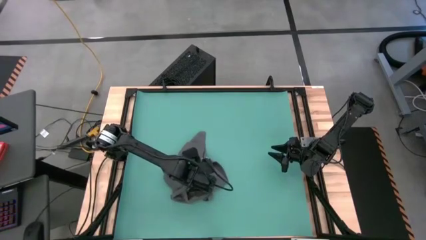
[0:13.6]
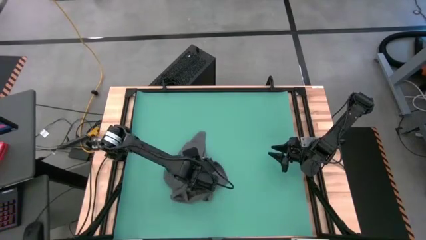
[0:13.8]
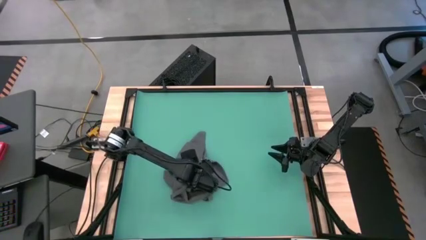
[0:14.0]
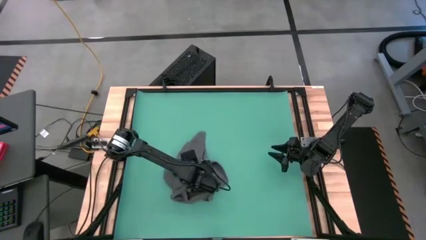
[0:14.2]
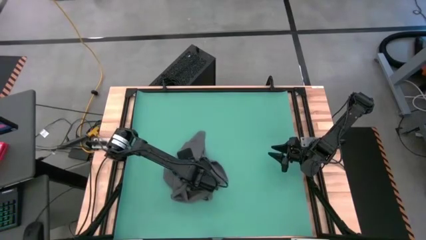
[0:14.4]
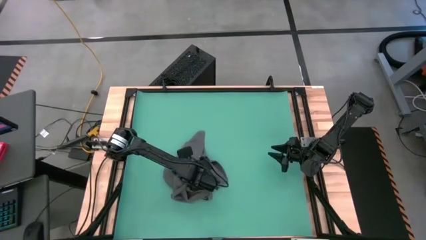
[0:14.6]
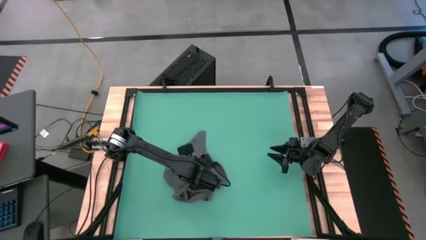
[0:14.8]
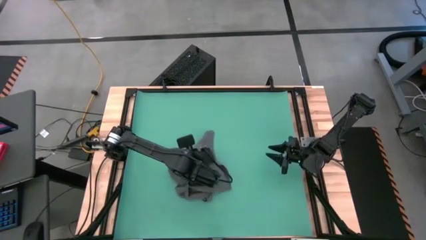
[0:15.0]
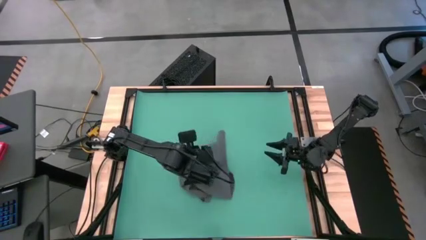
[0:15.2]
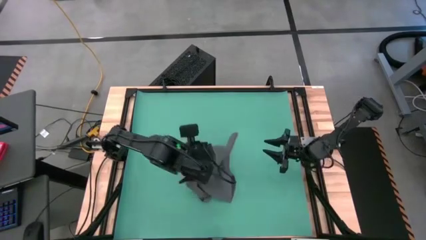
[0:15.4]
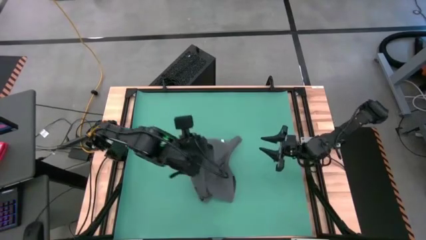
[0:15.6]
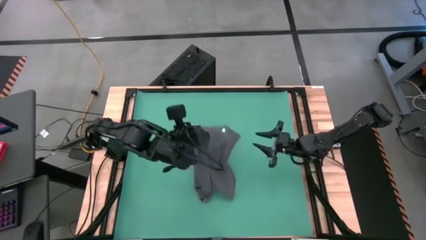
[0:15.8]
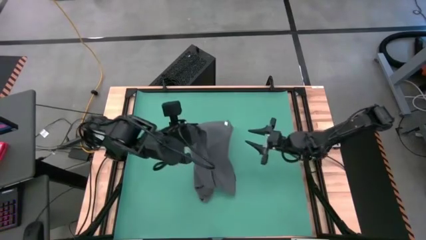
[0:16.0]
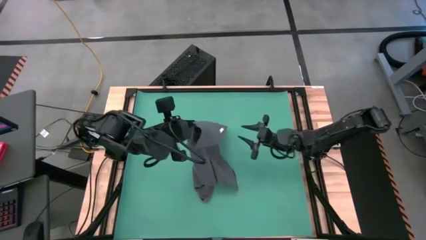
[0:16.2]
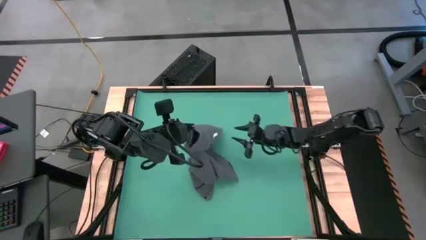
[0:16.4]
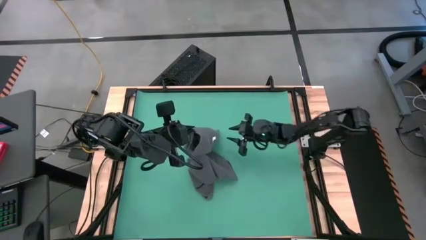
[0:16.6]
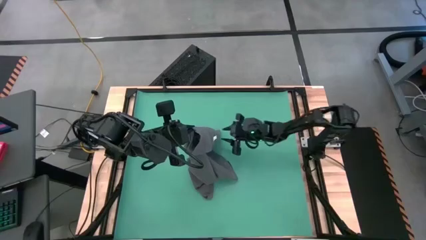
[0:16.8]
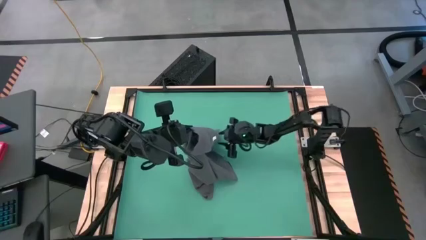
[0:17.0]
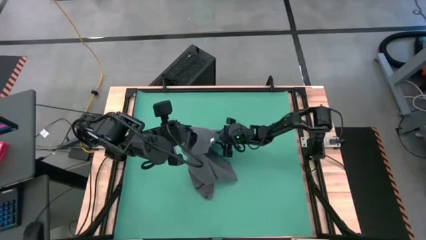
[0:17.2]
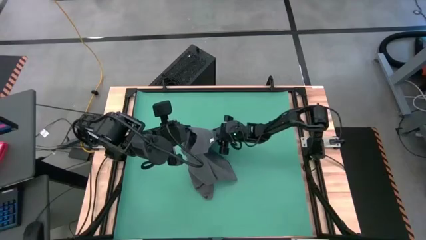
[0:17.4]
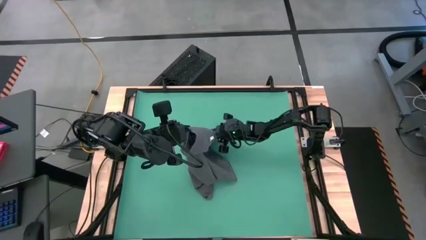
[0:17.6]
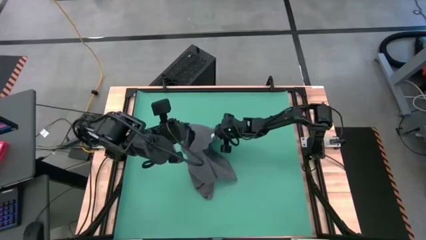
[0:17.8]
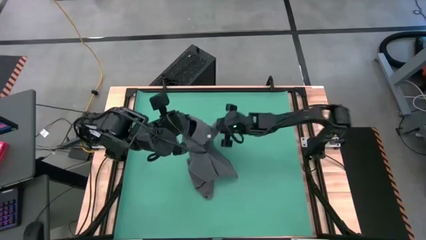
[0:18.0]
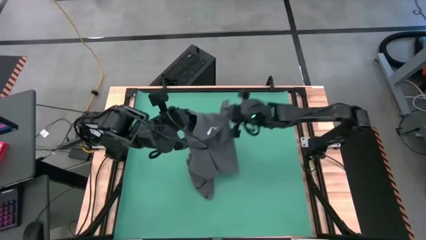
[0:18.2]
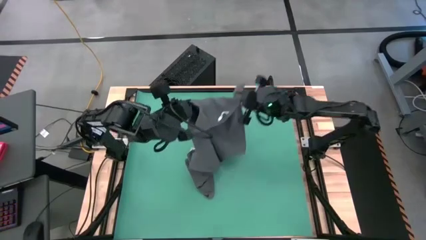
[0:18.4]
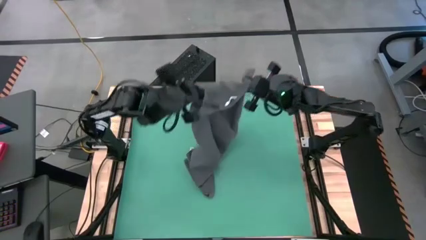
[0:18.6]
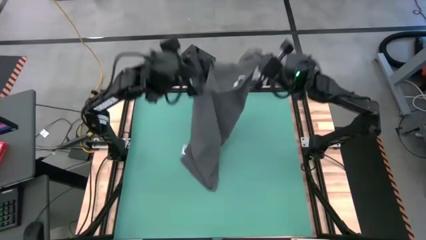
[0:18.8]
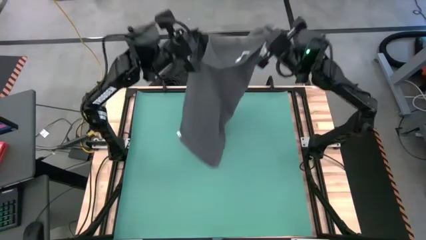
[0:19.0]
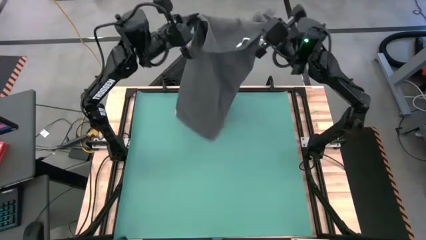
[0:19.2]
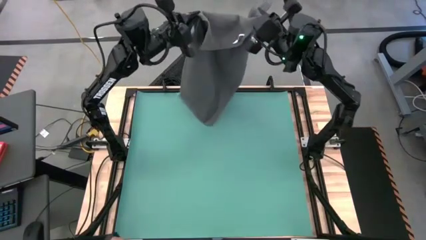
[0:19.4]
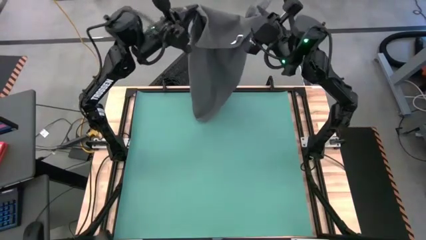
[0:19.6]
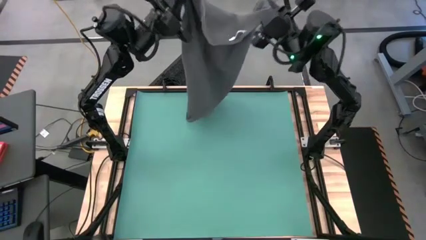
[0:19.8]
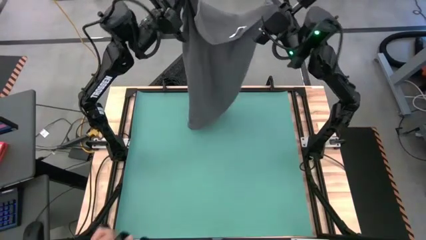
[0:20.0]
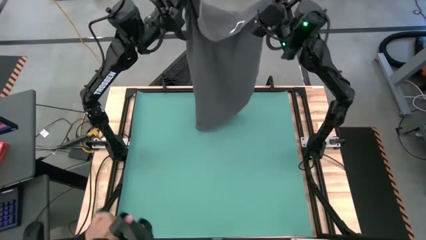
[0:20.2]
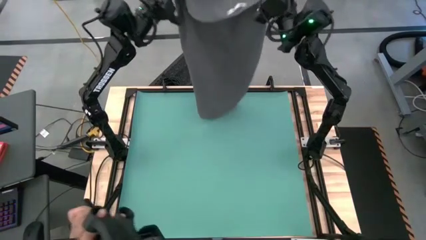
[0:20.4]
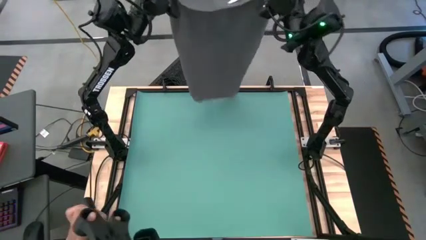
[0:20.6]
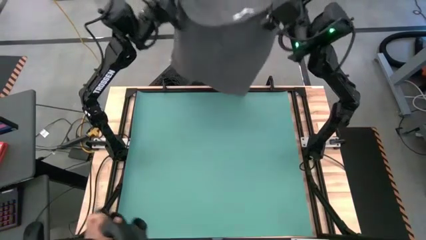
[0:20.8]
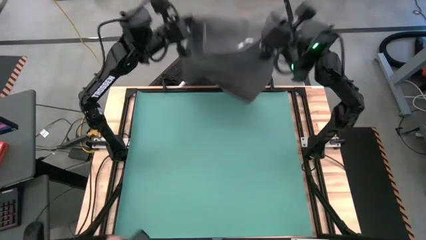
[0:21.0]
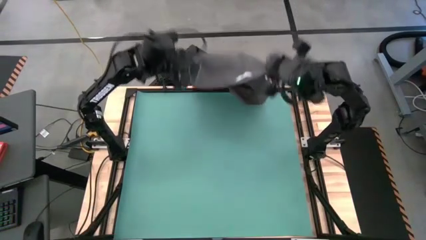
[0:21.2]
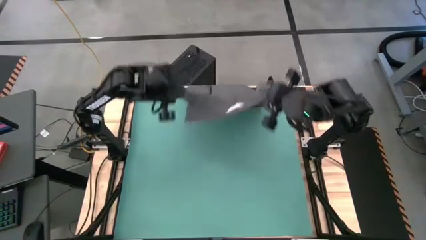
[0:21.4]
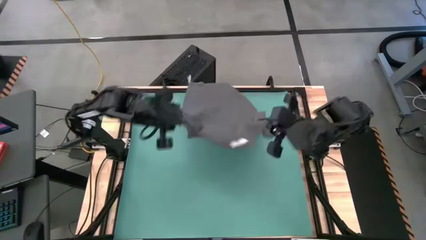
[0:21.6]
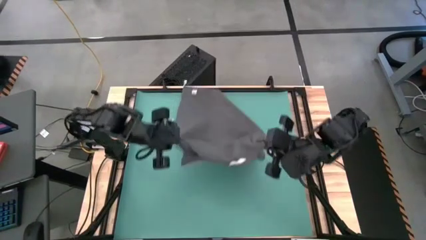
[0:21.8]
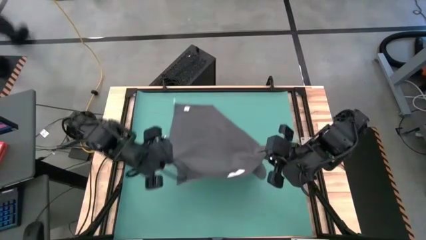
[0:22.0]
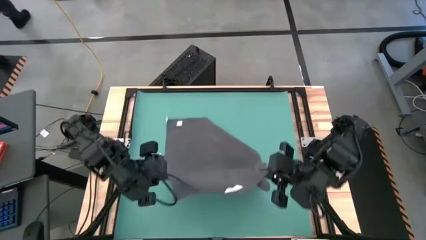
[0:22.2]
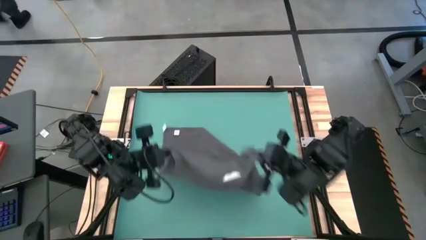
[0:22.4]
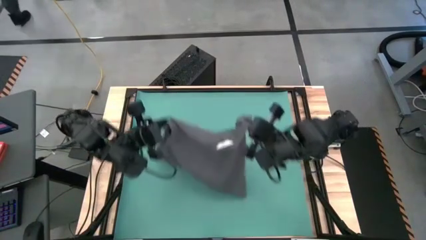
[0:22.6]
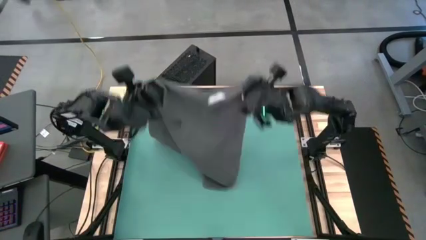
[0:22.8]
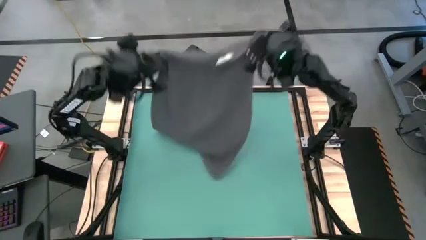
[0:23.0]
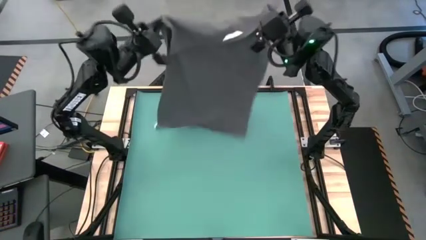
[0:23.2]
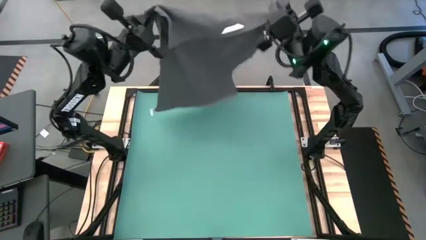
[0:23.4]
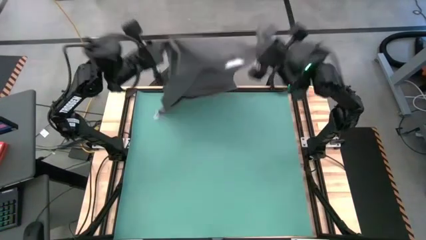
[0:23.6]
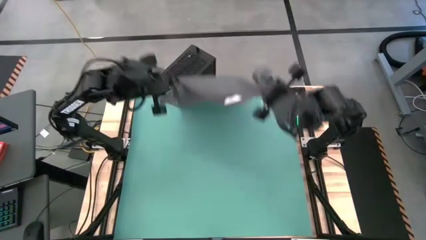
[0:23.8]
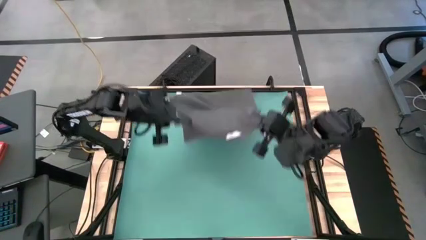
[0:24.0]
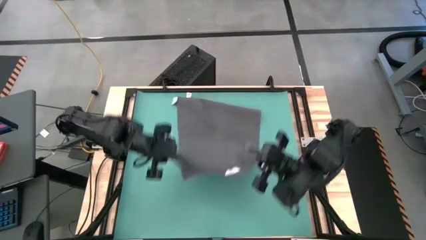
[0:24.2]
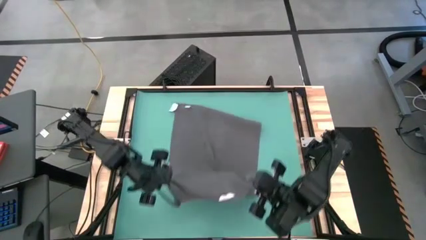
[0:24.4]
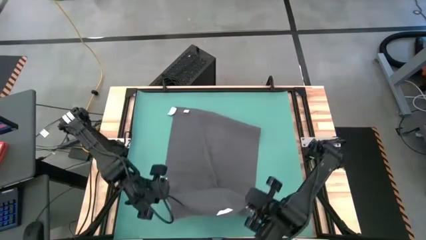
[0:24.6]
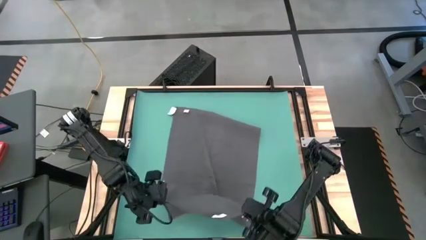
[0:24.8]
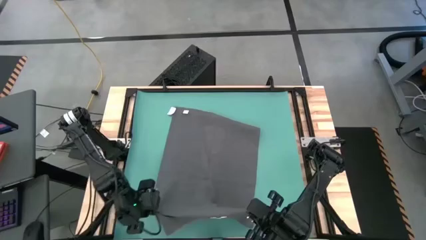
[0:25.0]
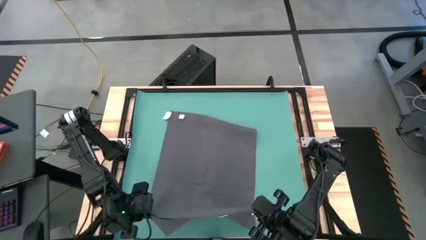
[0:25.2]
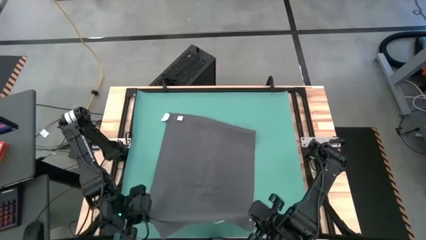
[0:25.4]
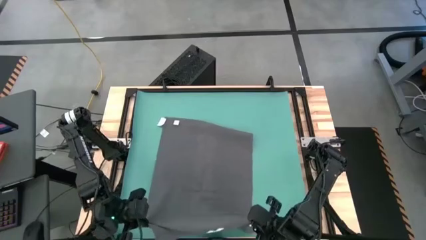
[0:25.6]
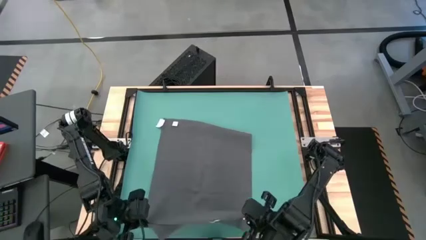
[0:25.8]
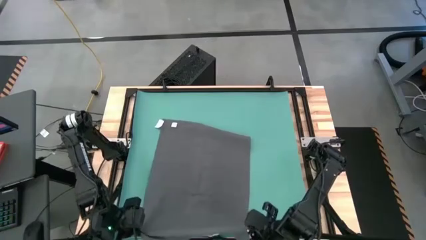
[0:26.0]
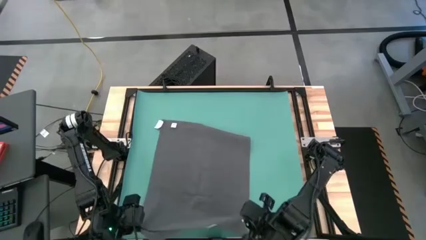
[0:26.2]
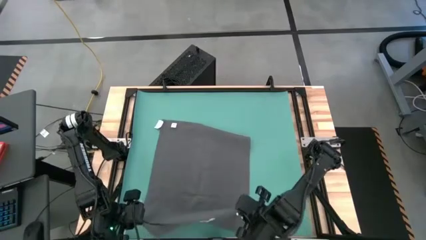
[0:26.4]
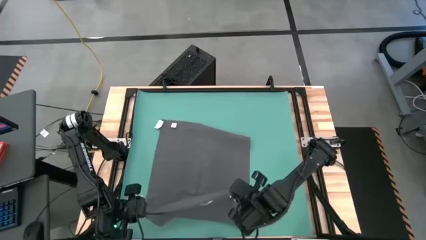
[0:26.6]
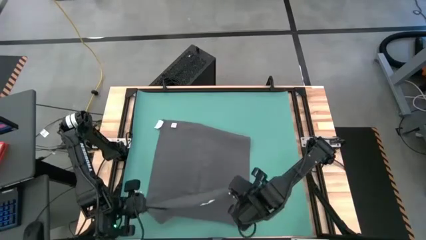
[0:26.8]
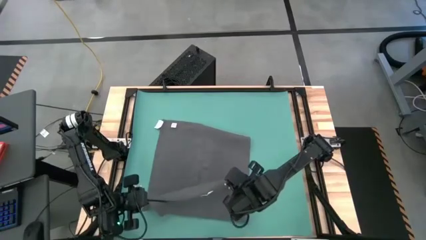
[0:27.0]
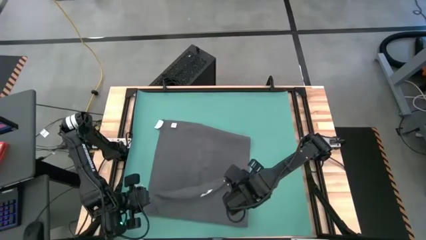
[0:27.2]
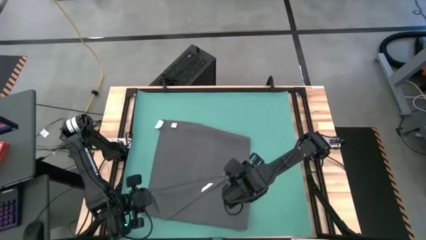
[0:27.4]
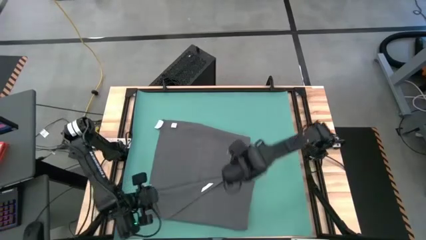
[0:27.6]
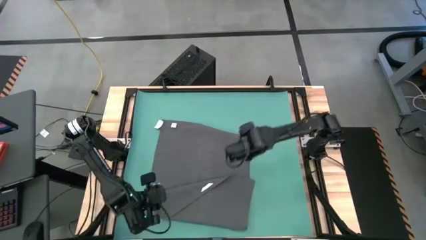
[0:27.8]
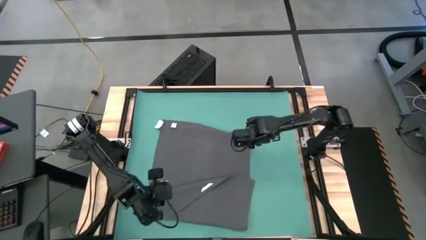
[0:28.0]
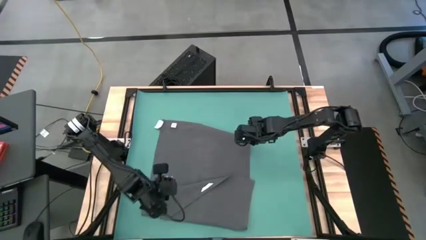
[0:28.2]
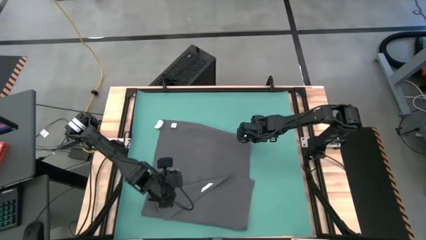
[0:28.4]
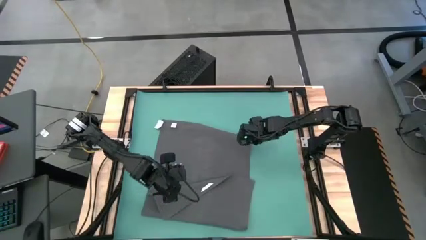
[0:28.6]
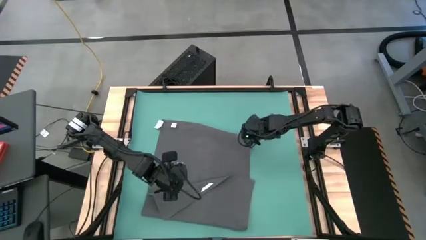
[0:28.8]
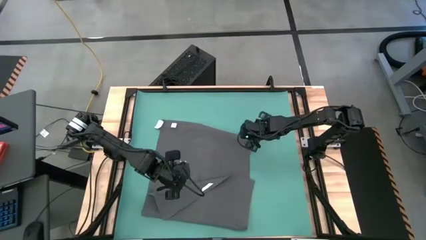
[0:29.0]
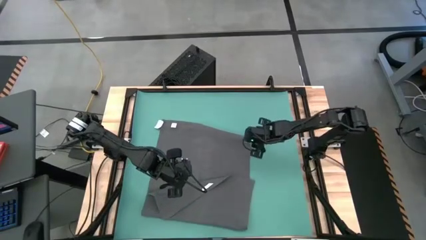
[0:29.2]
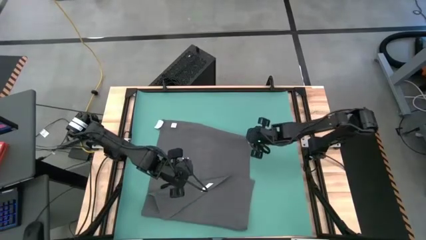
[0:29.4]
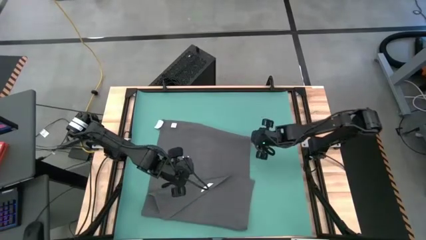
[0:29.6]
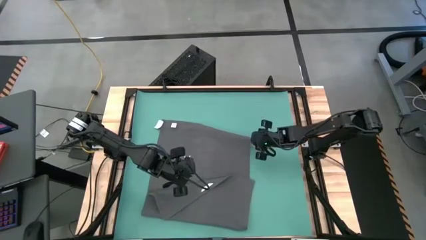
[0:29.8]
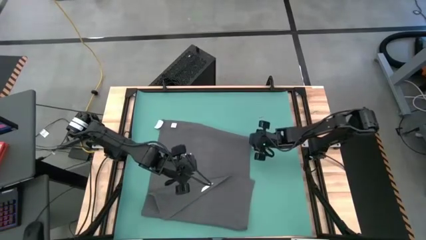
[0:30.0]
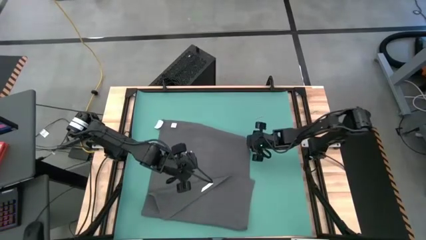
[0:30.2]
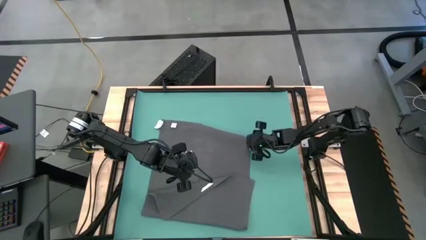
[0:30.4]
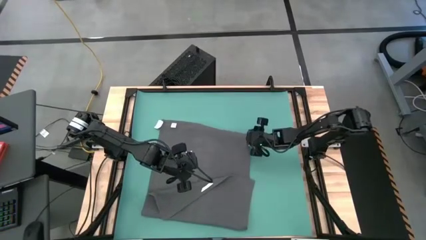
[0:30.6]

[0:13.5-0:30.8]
Task: Roll towel
Roll the gray towel on the table
